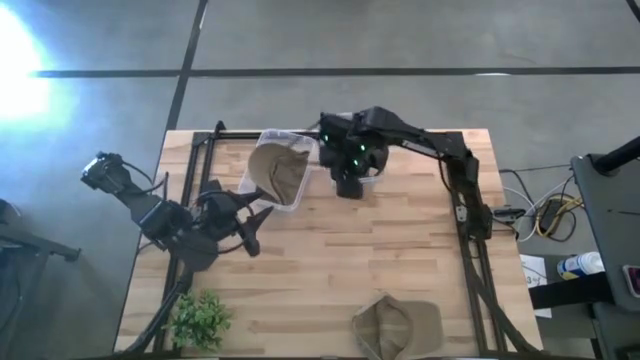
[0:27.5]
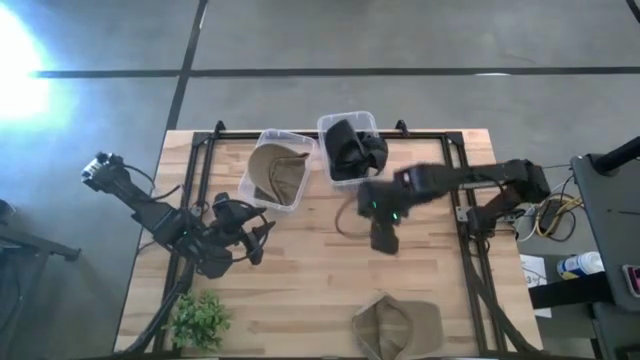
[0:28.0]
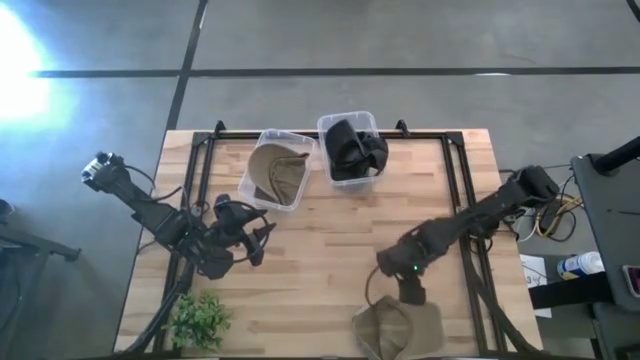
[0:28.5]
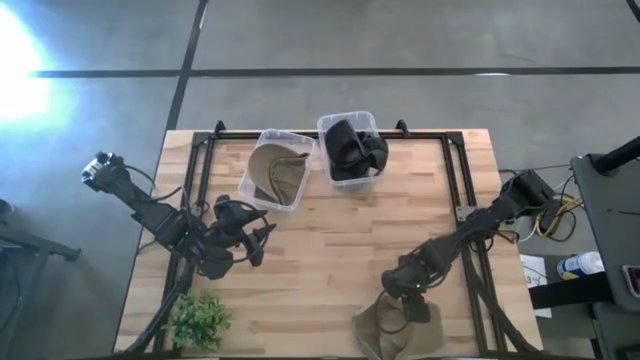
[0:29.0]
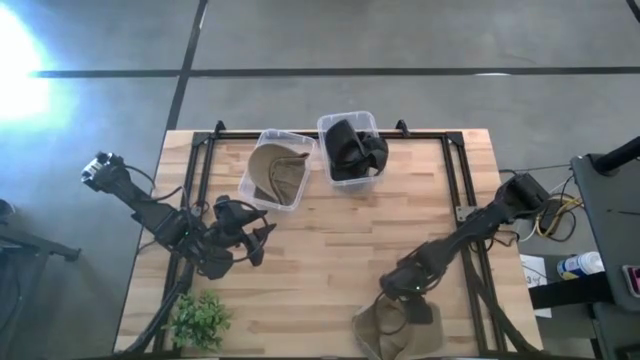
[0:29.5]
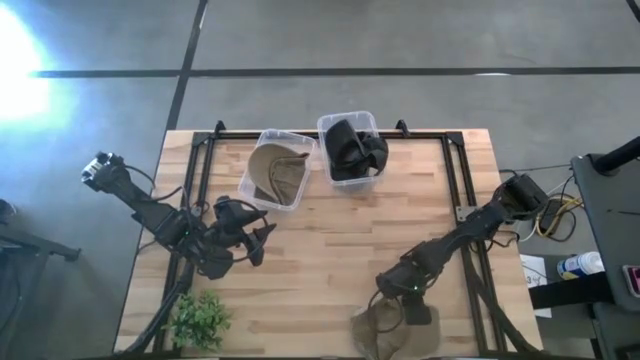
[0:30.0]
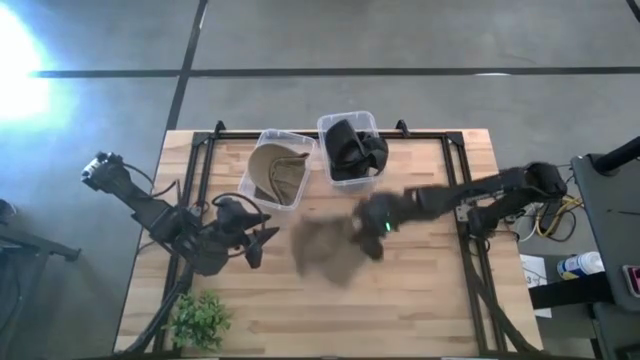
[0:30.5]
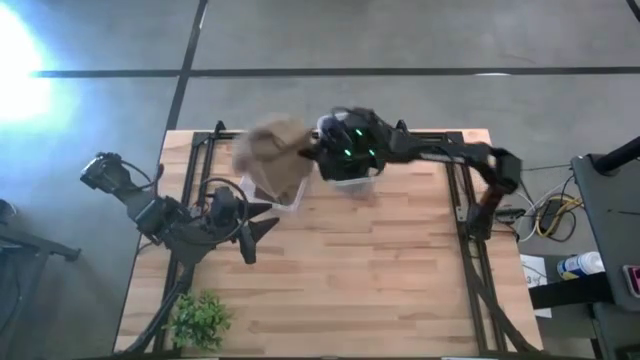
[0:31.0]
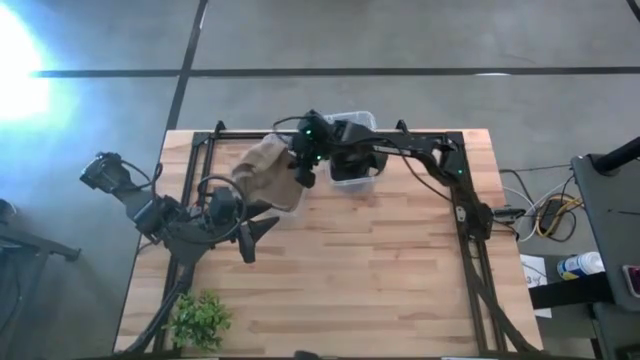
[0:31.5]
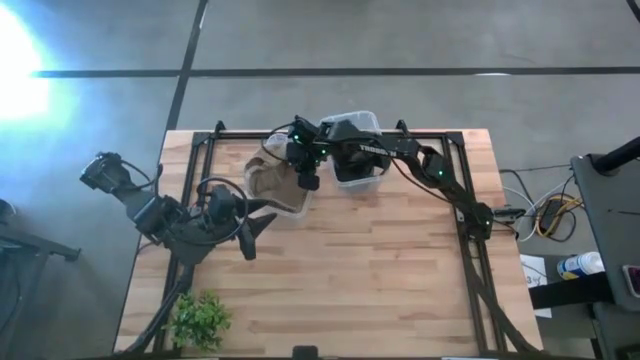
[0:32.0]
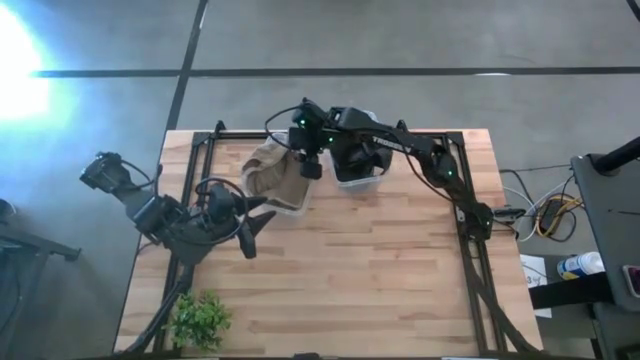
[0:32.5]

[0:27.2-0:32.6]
Task: Pick & Place hat
Put the brown cap into the left transparent bin

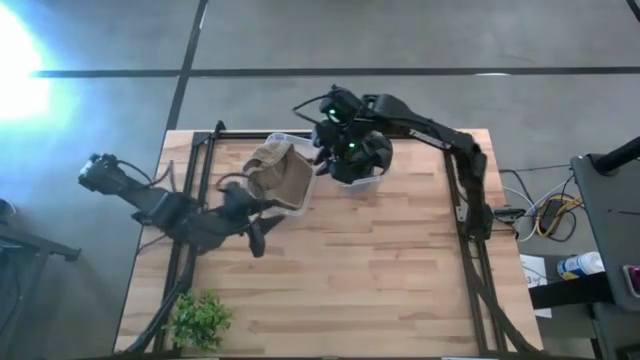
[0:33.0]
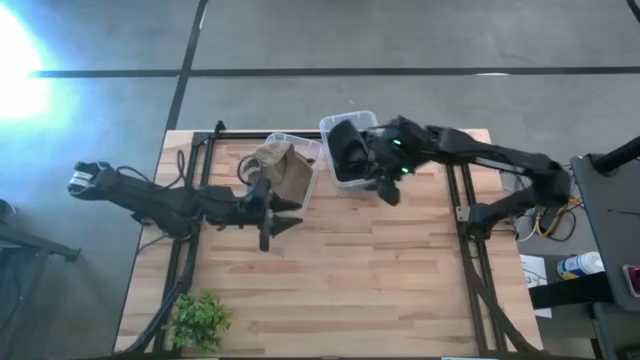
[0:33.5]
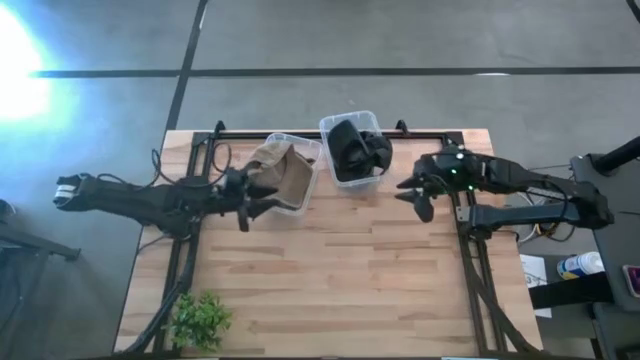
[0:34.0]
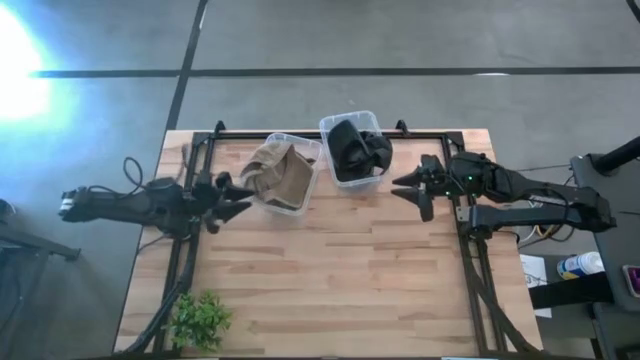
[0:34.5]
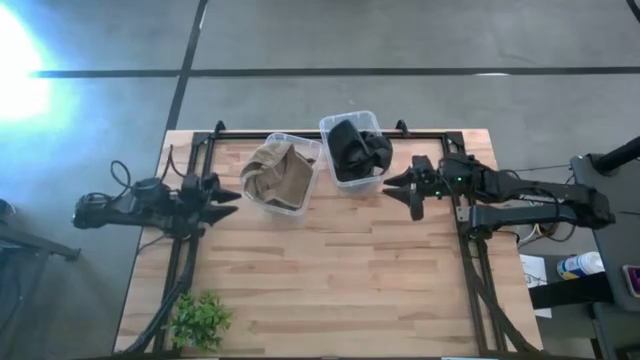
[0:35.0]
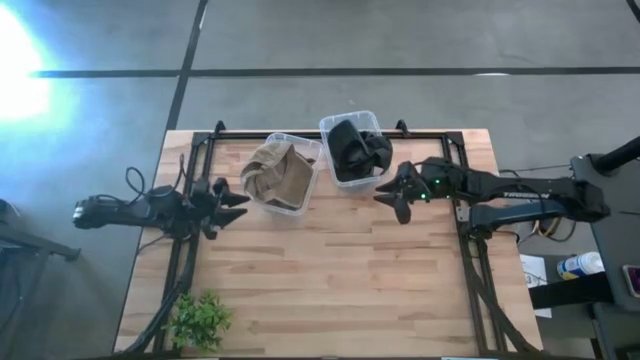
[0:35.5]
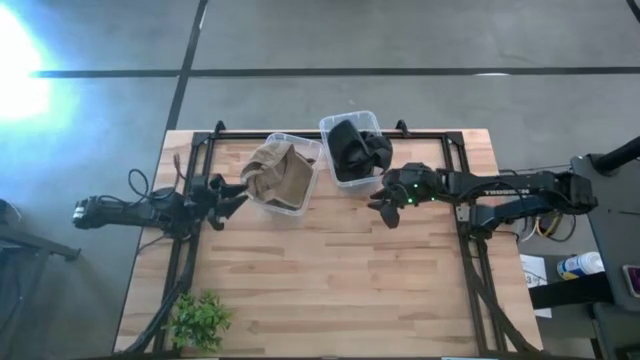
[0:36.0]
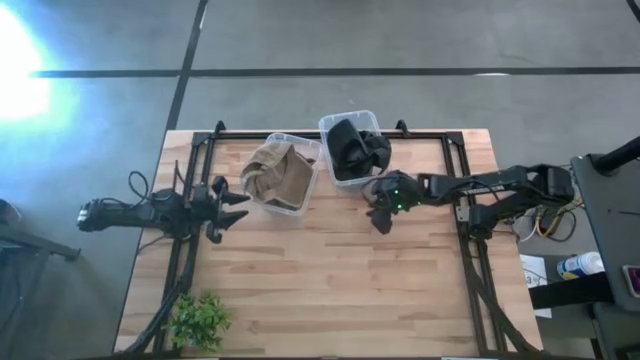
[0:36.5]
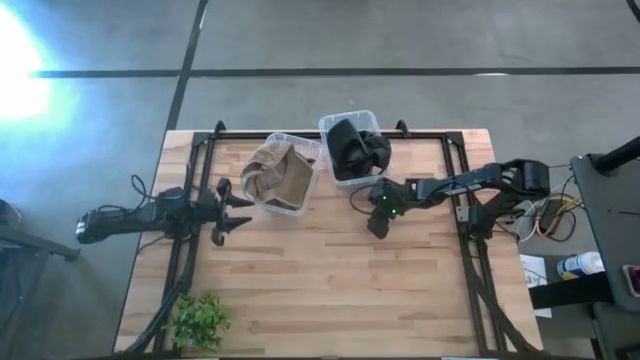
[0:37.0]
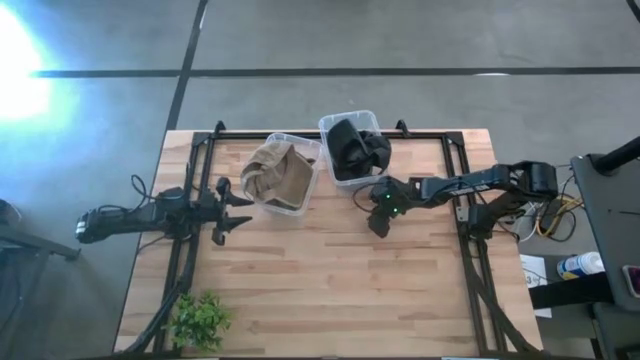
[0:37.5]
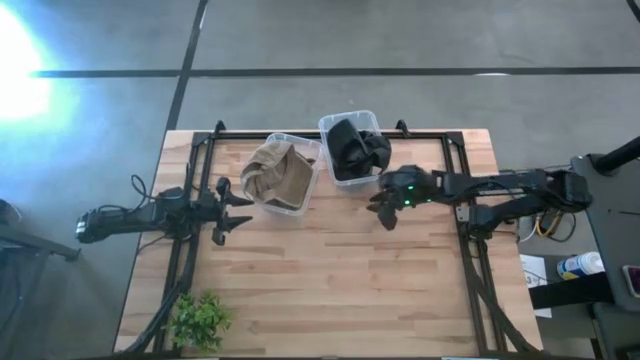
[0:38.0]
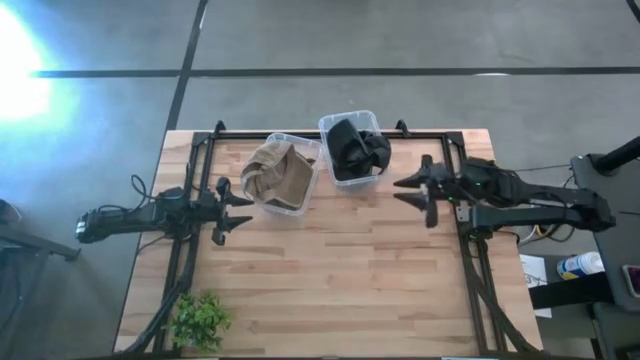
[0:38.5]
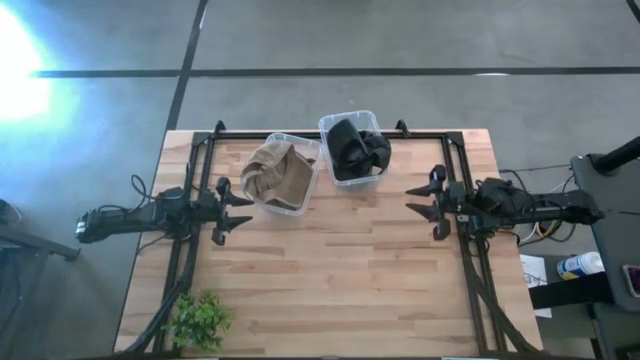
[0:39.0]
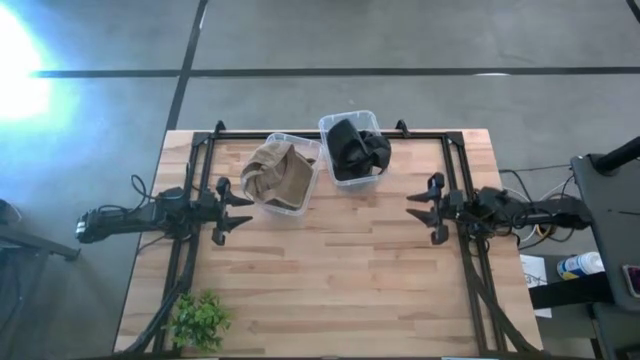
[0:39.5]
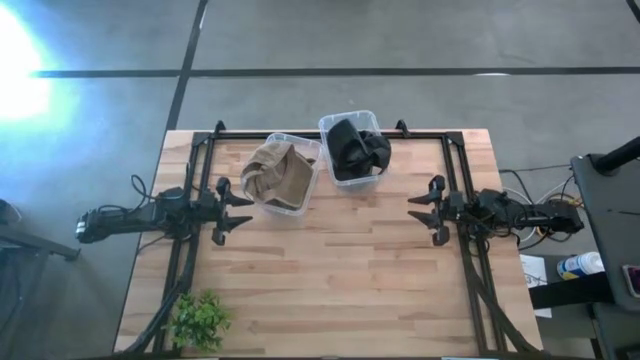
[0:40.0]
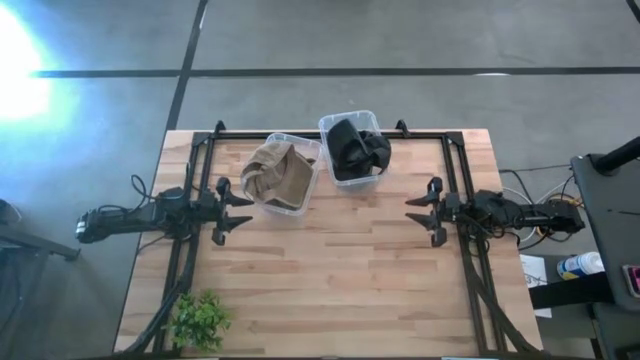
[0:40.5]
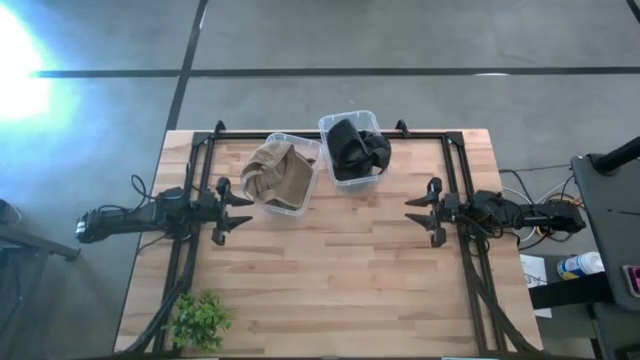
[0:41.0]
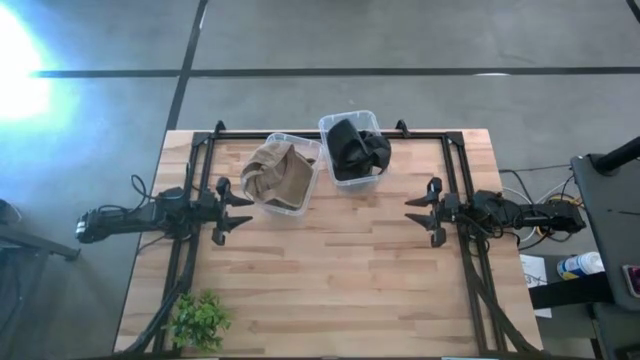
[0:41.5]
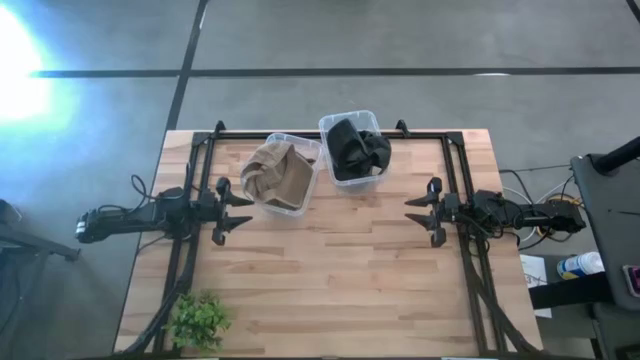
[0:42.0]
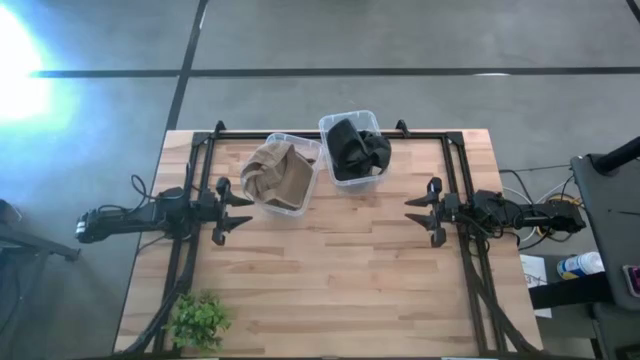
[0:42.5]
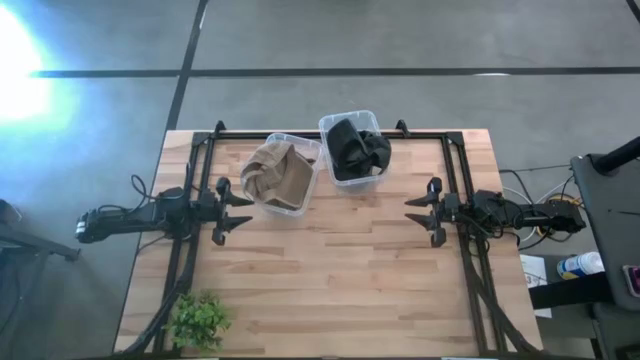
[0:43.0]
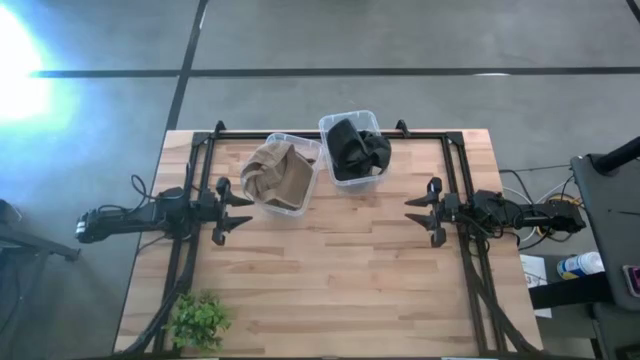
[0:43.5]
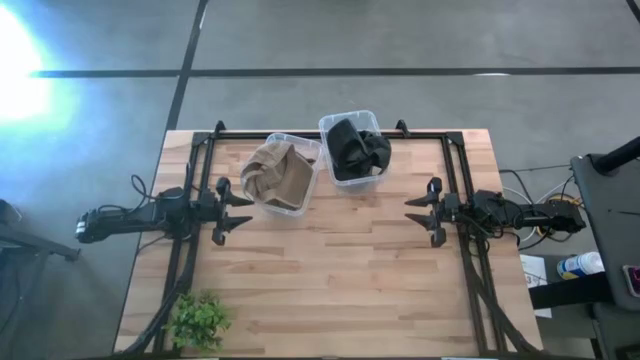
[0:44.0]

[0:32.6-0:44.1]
Return to Home Position

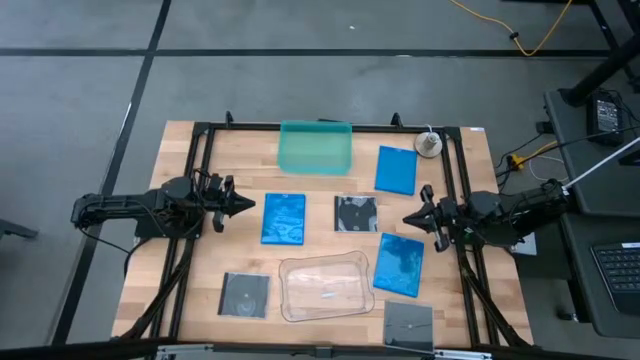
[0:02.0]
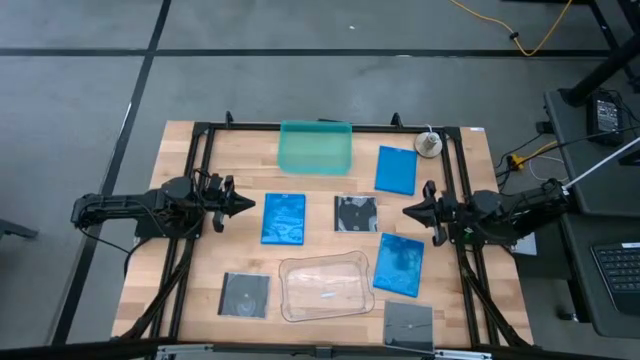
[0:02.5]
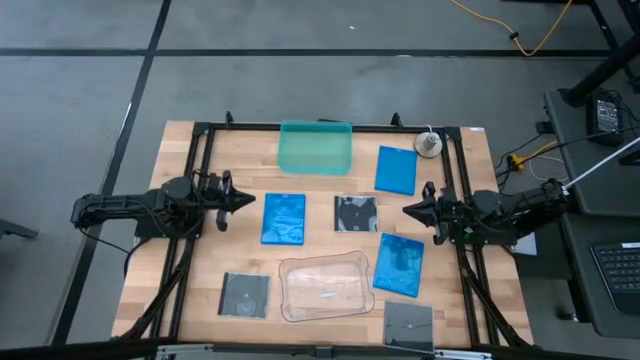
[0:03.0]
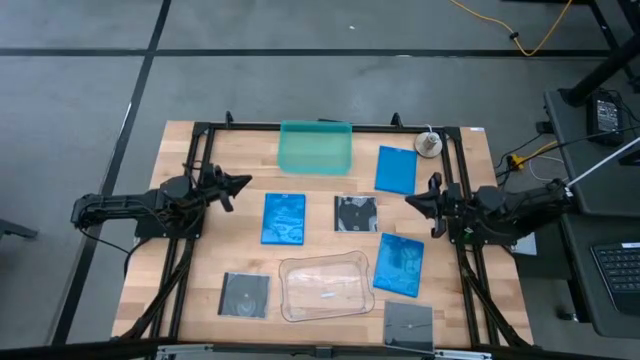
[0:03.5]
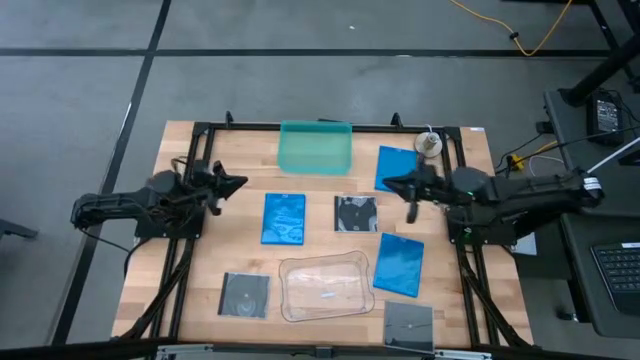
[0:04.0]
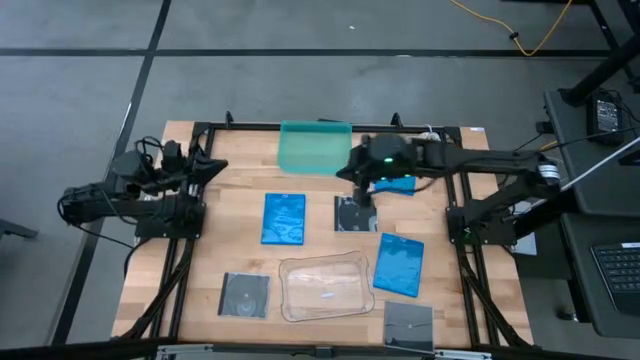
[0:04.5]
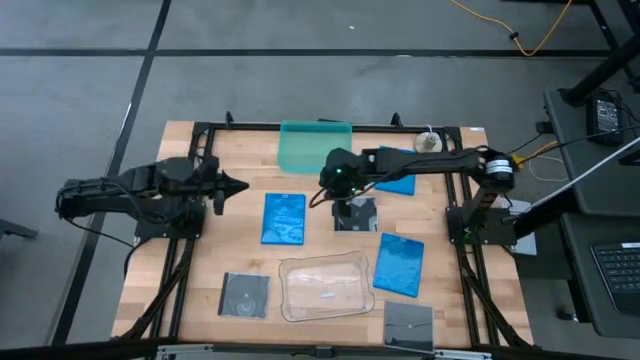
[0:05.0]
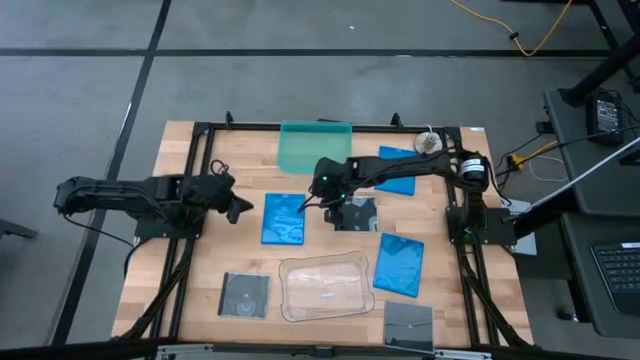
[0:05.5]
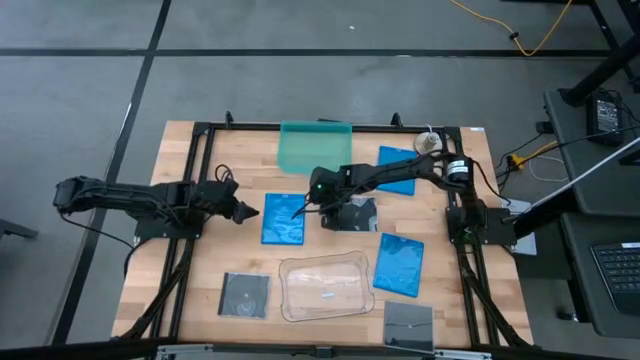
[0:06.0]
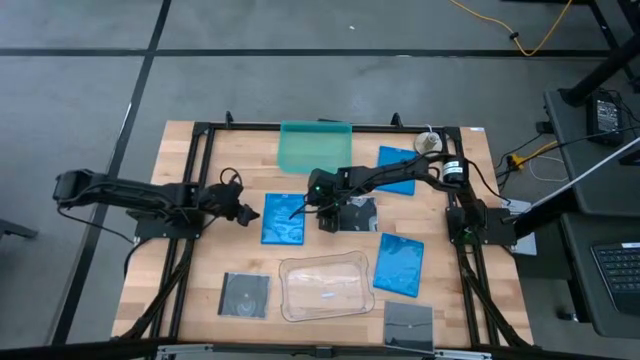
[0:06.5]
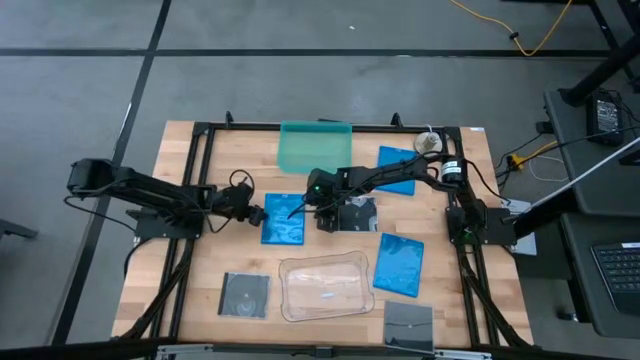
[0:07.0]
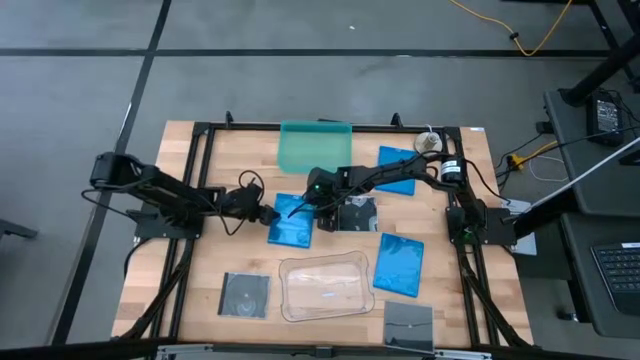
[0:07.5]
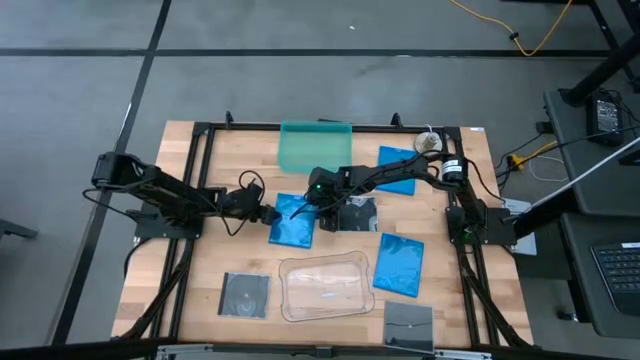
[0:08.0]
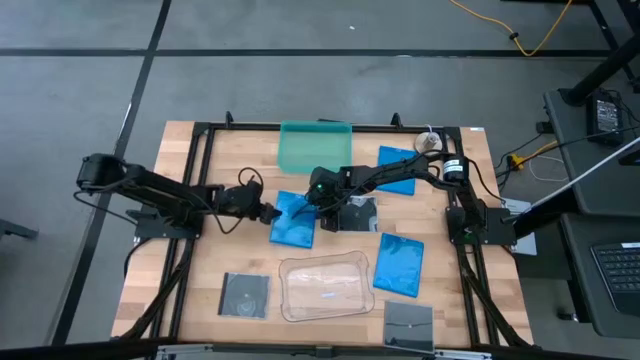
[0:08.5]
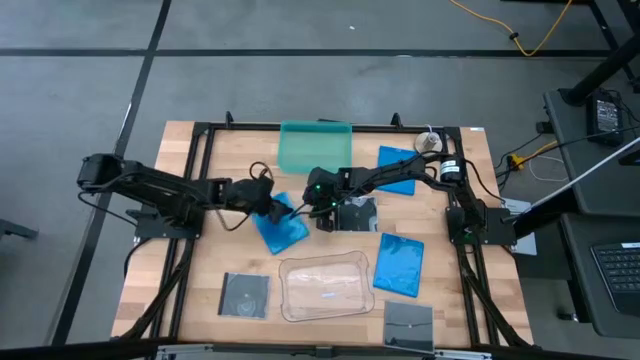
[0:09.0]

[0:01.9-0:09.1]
Task: Pick & place jewel cases by type
Put the middle left blue CD case into the green bin
